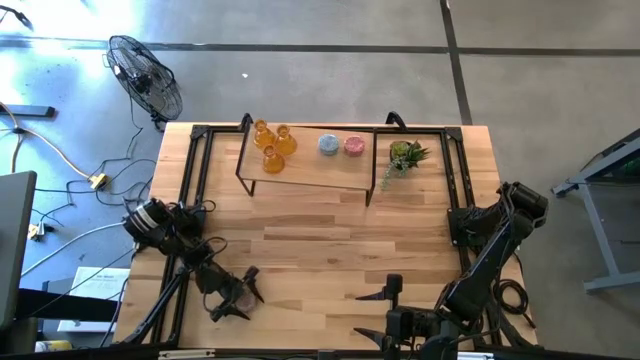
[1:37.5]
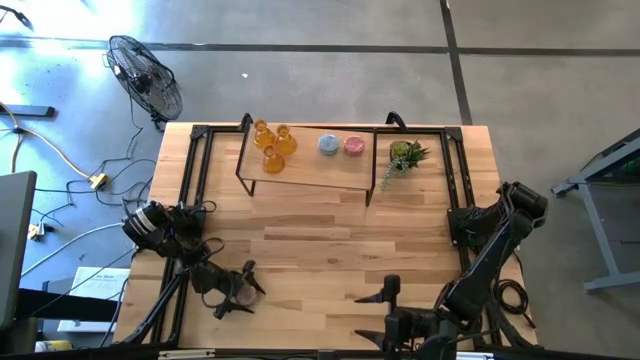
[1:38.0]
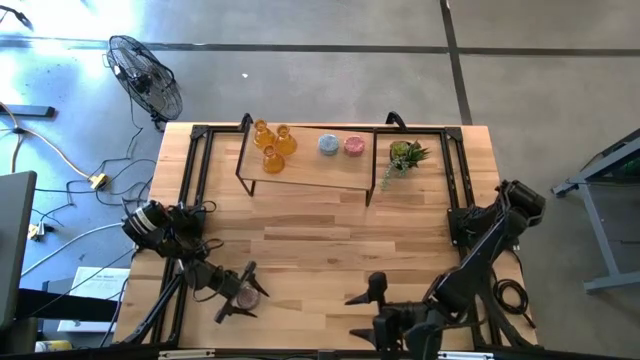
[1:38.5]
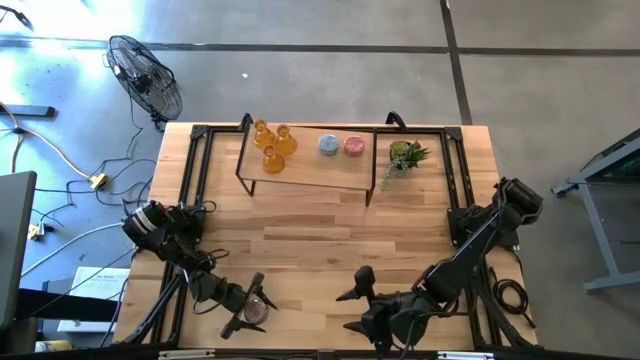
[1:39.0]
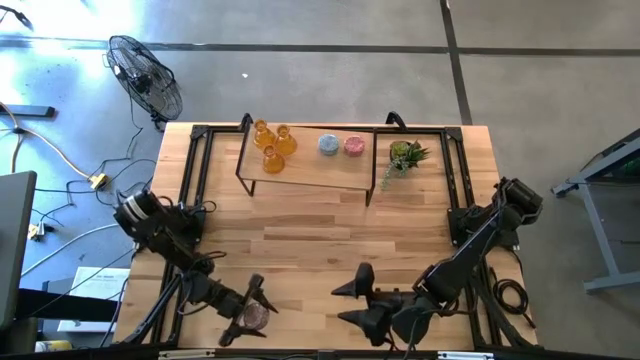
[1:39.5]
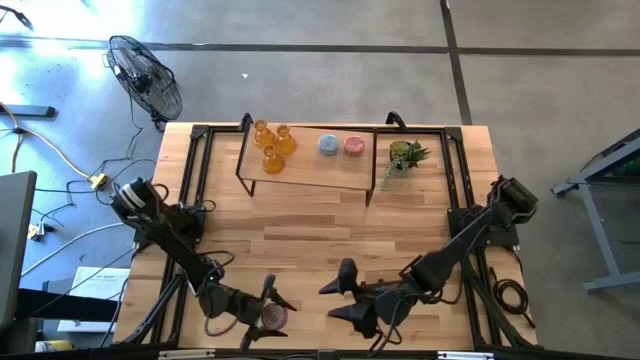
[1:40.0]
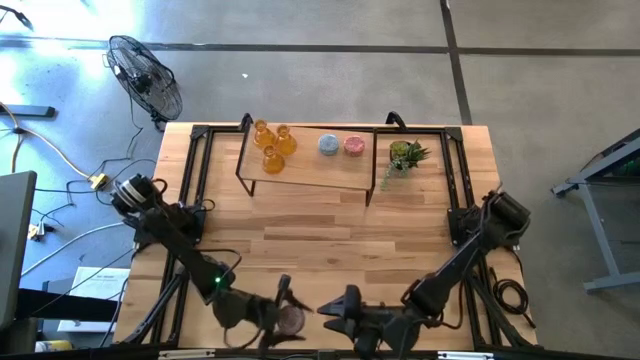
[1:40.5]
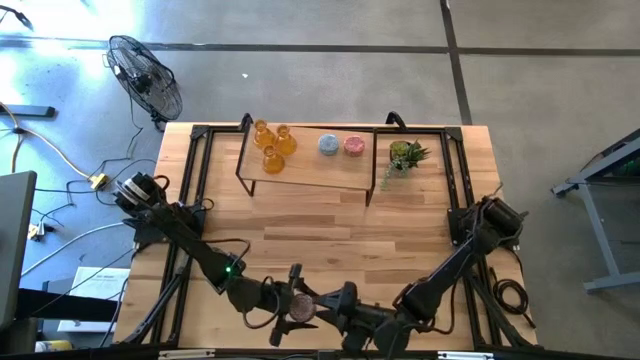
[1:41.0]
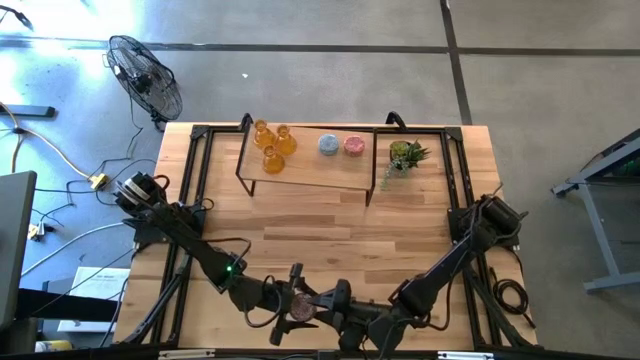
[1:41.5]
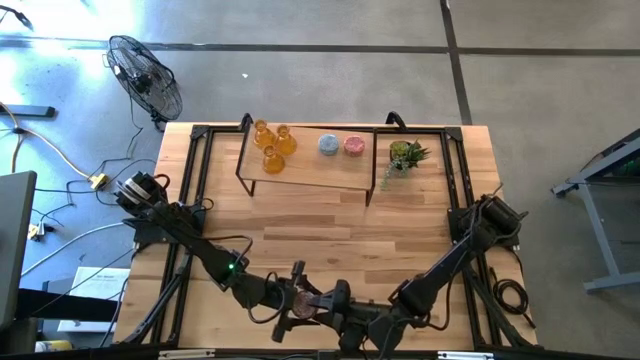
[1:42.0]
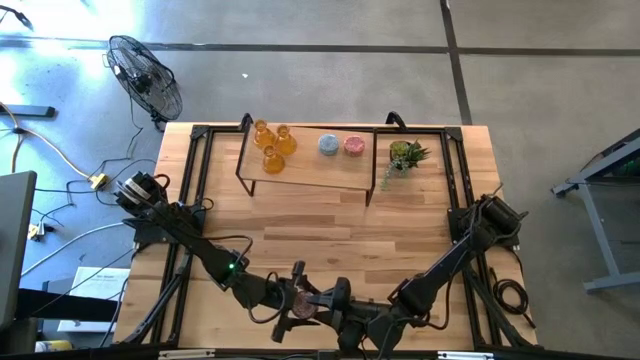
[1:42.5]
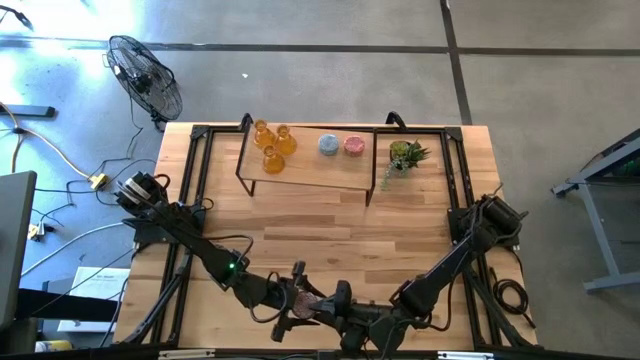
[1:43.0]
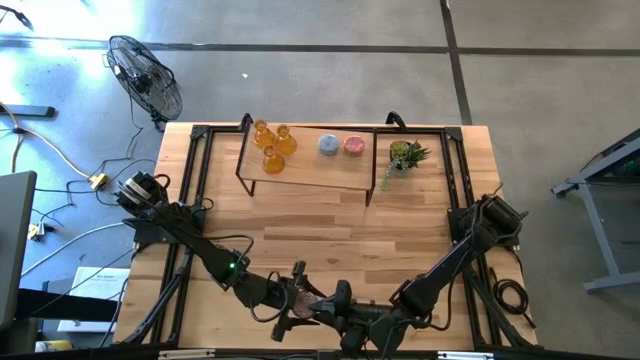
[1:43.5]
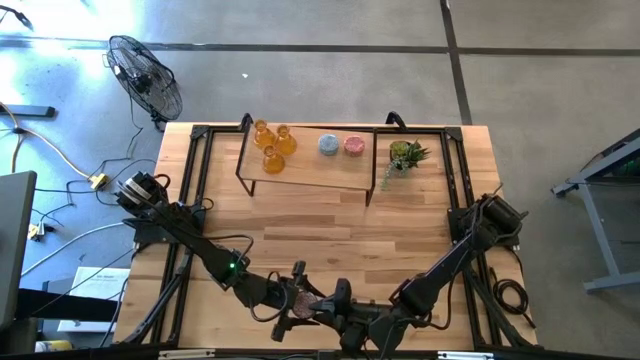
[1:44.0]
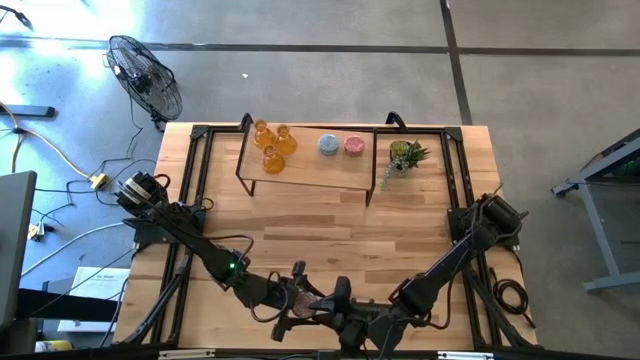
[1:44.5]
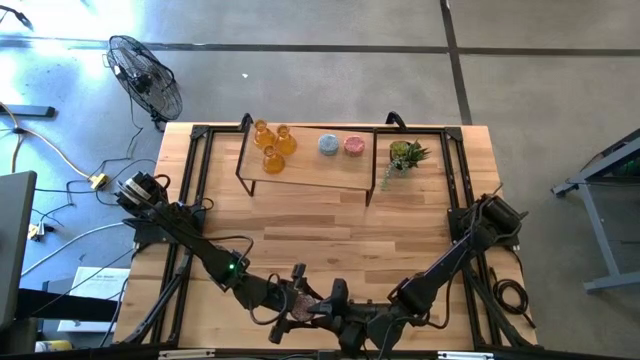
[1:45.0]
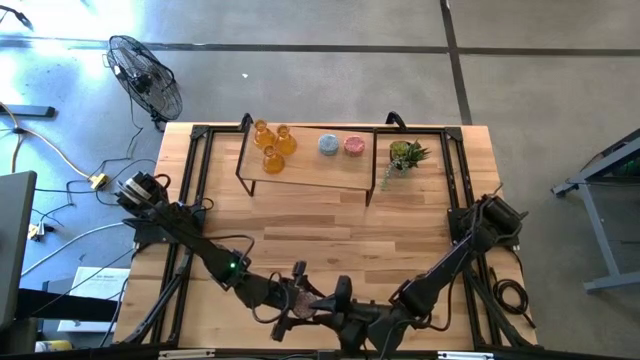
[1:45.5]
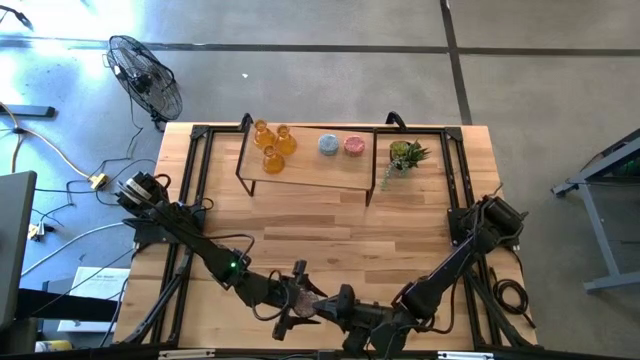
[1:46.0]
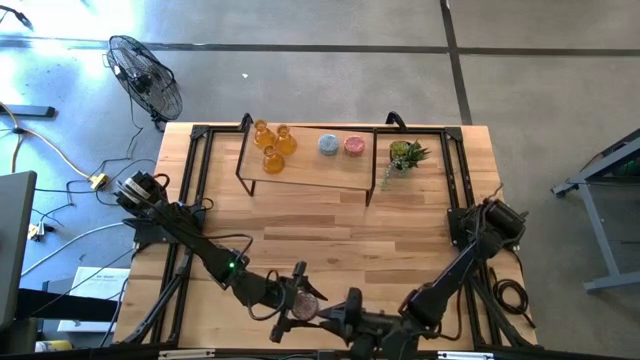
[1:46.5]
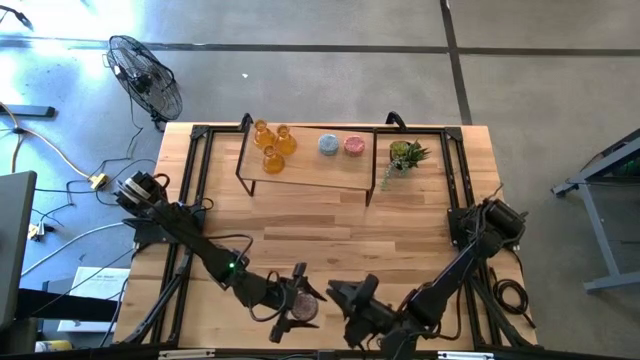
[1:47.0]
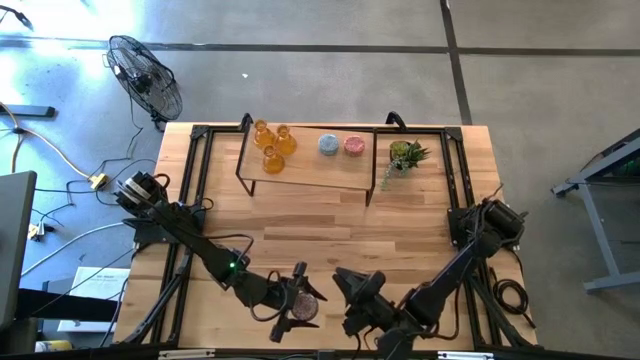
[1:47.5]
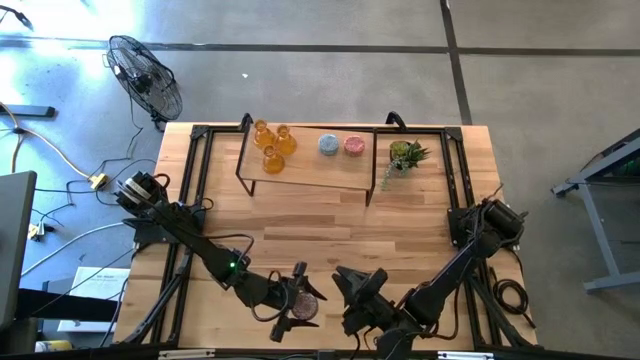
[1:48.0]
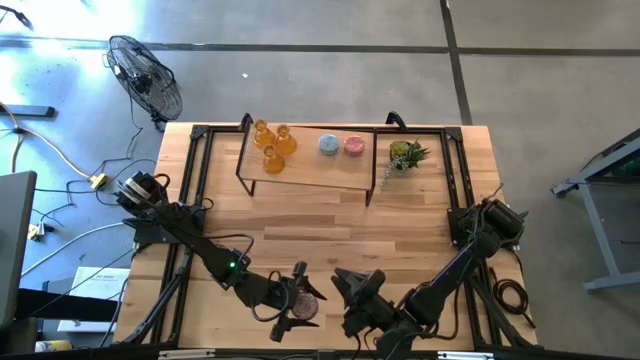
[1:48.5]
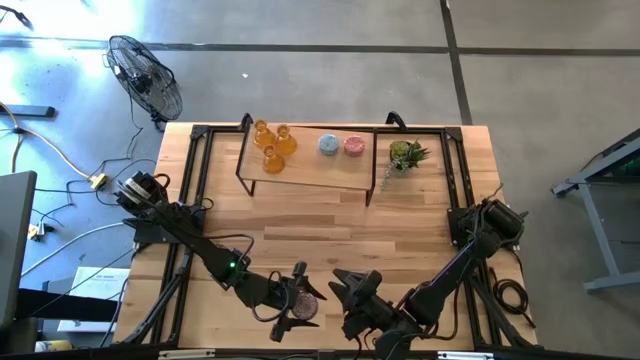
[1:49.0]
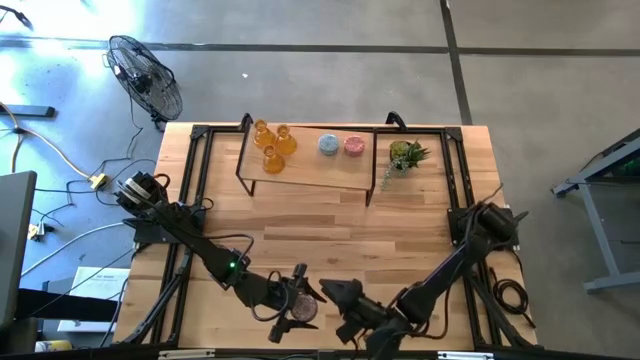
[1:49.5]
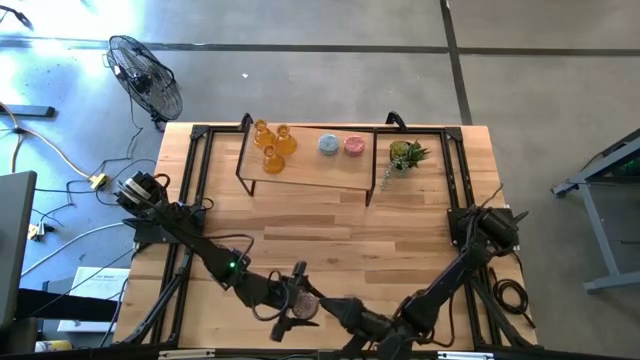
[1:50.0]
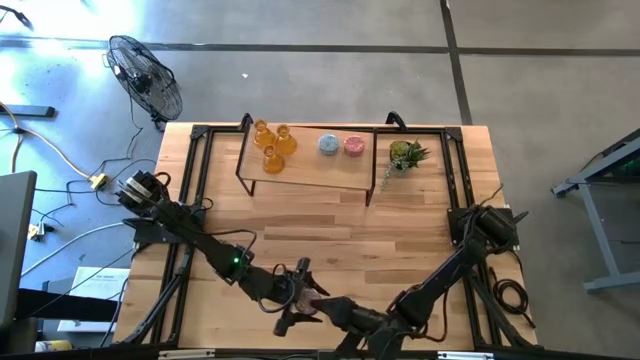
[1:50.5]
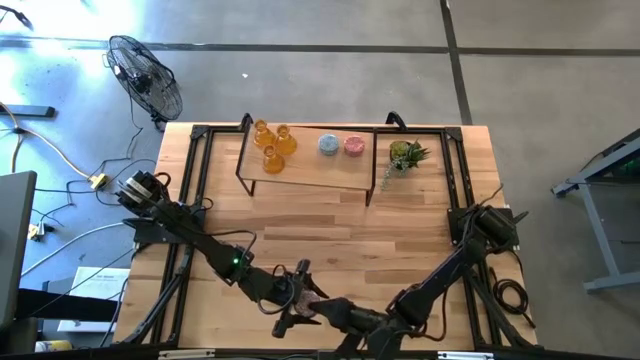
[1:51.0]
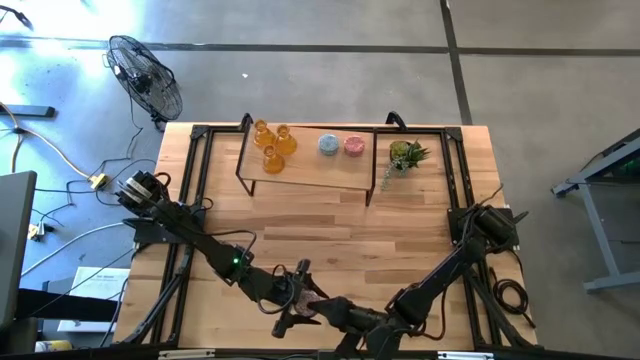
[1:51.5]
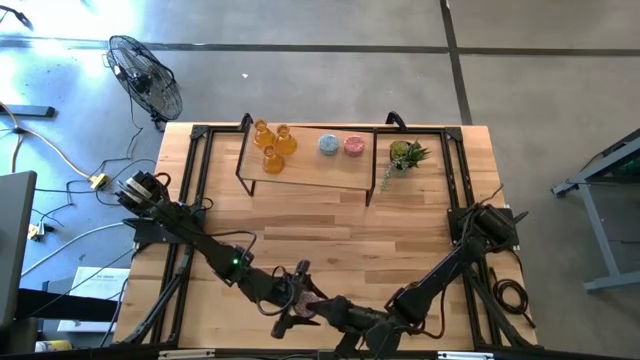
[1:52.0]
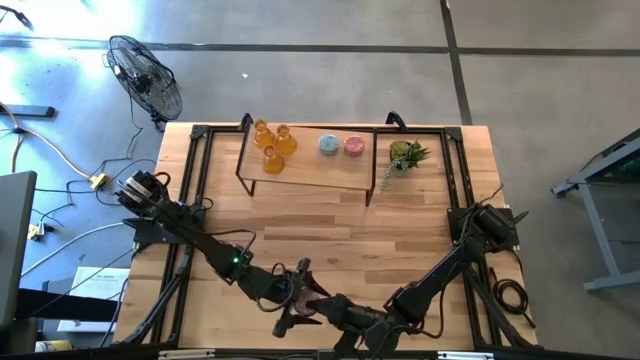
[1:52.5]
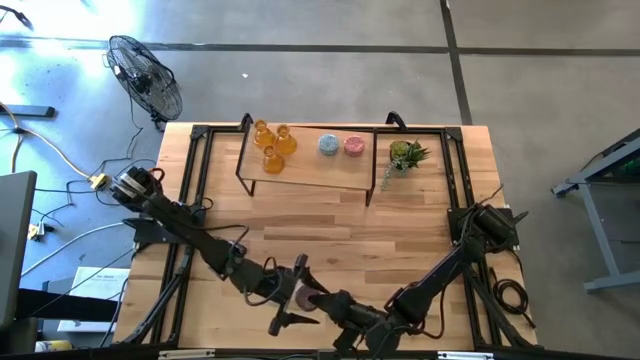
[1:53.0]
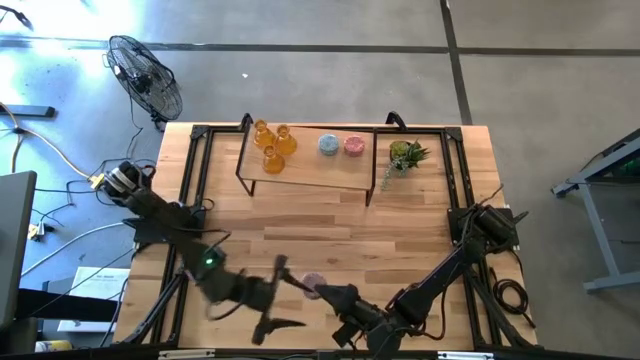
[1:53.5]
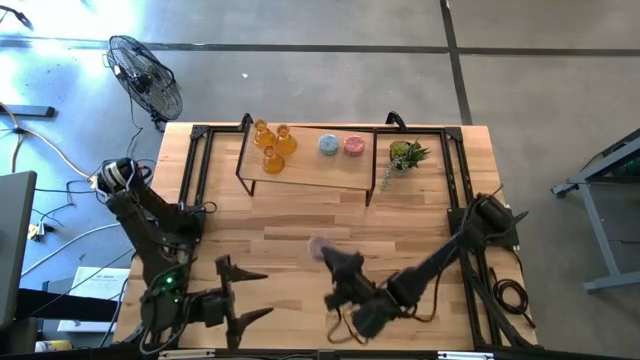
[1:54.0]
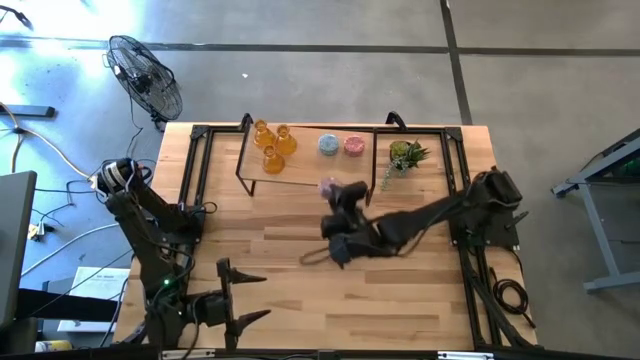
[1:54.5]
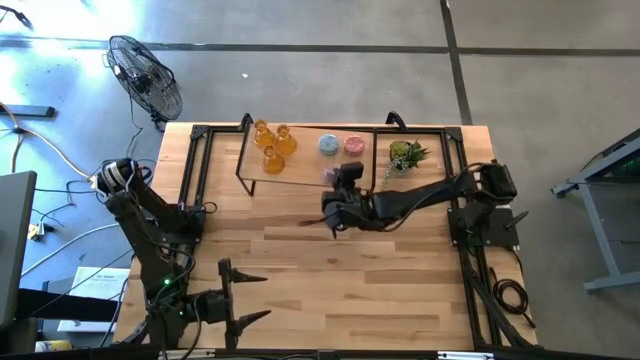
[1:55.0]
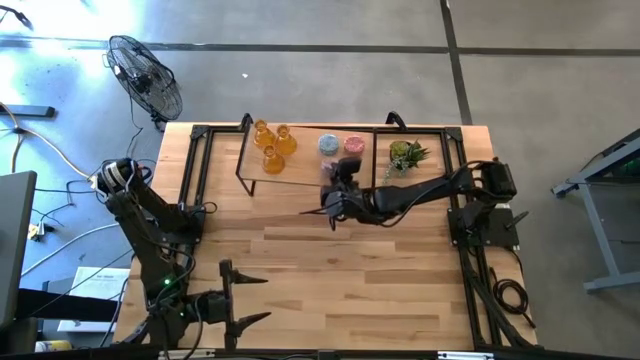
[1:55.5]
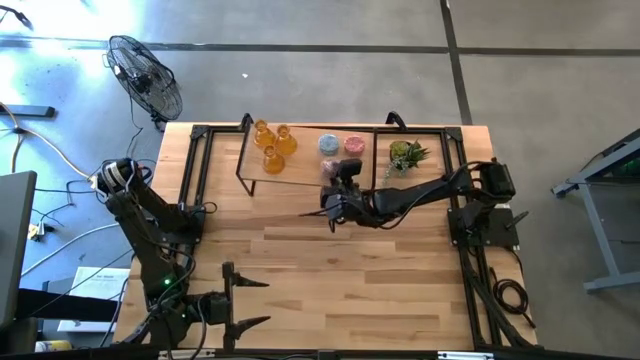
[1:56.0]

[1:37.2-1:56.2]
Task: Pick & Place candle stick holders
Put the red scented candle on the shelf

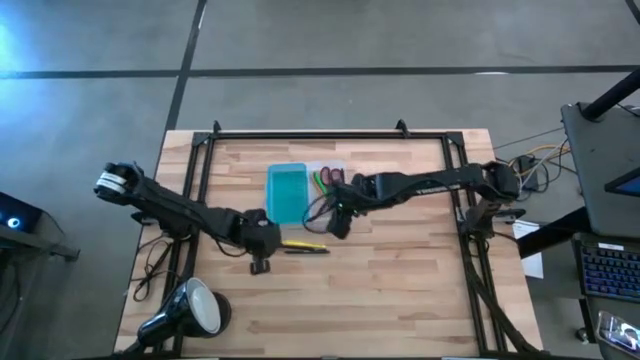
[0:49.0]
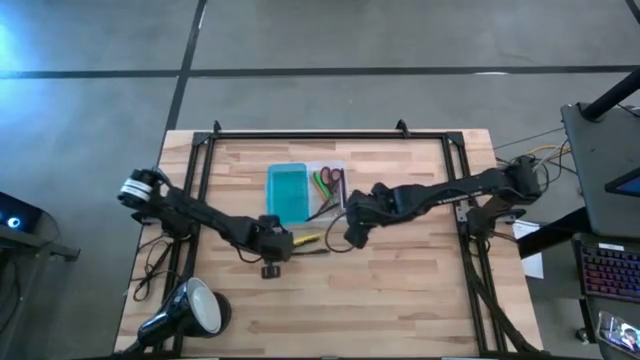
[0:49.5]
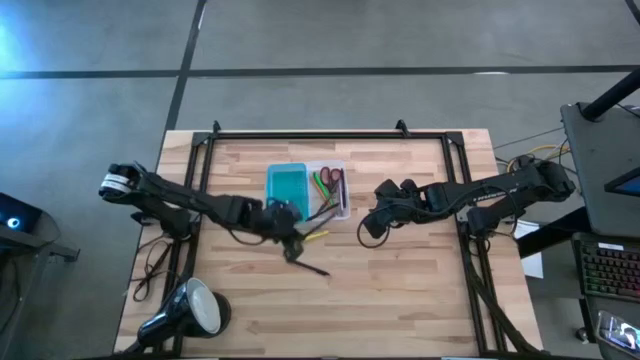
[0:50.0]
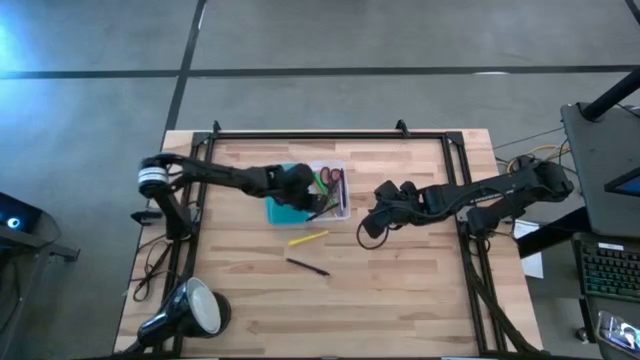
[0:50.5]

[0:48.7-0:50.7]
Task: Pick & place school supplies into a supply box
Put the black pen into the blue supply box

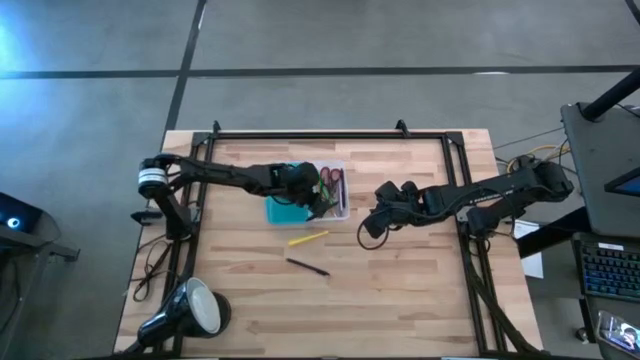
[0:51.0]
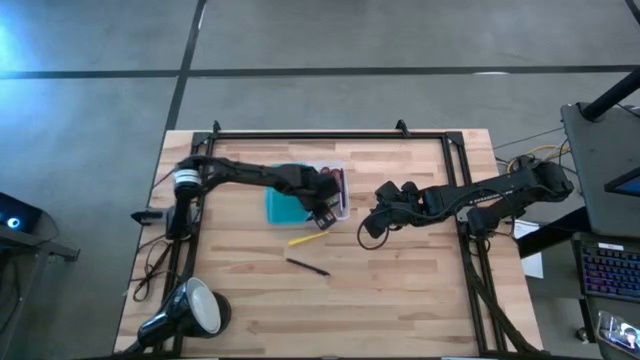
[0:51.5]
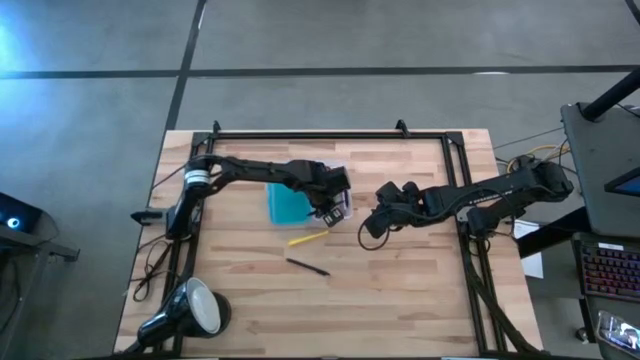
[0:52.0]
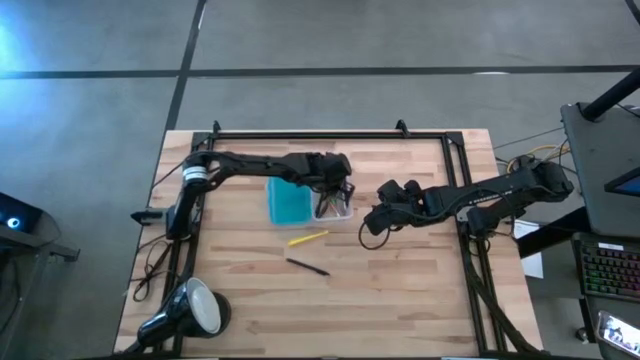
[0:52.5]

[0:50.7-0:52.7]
Adjust the black pen in the blue supply box
